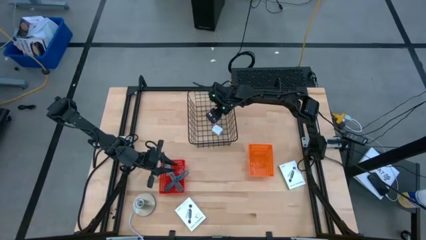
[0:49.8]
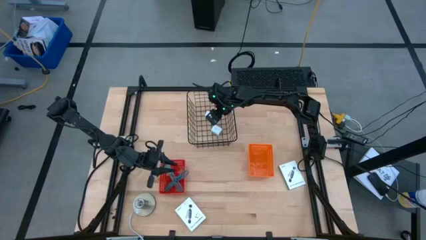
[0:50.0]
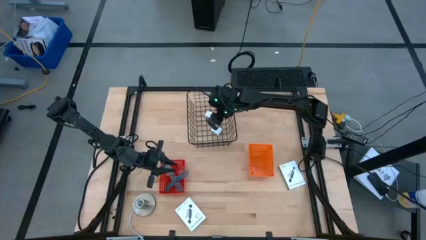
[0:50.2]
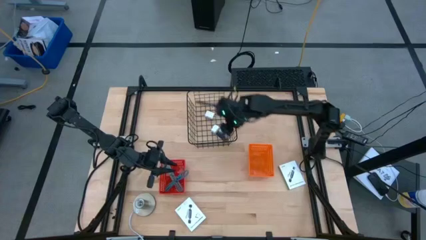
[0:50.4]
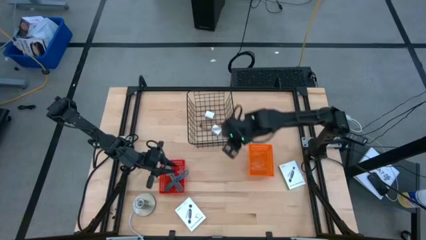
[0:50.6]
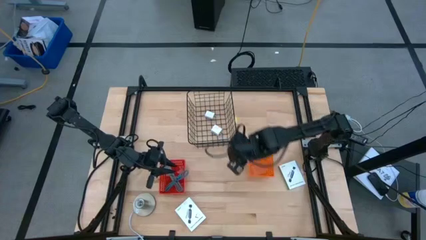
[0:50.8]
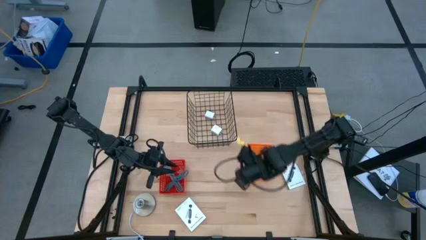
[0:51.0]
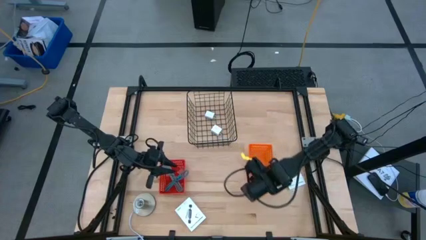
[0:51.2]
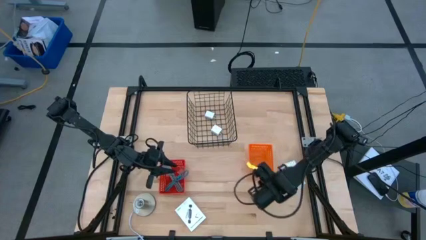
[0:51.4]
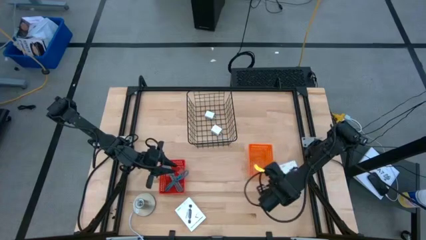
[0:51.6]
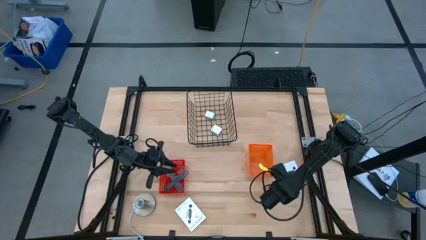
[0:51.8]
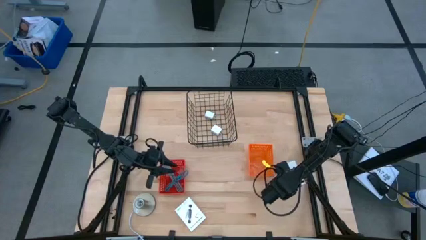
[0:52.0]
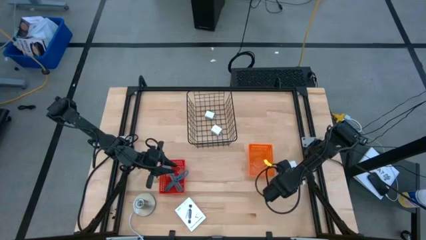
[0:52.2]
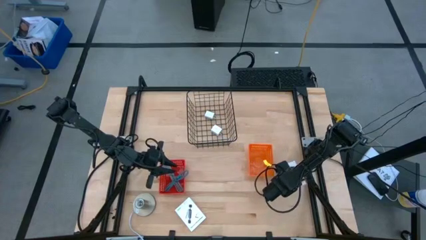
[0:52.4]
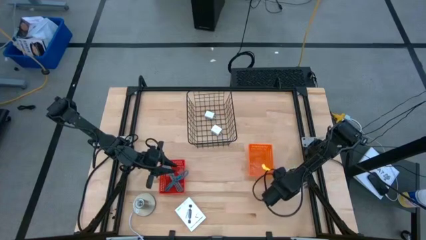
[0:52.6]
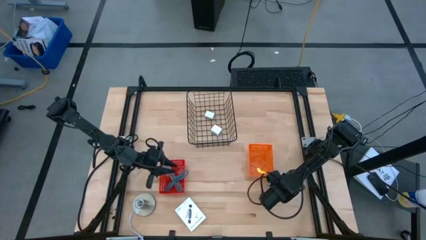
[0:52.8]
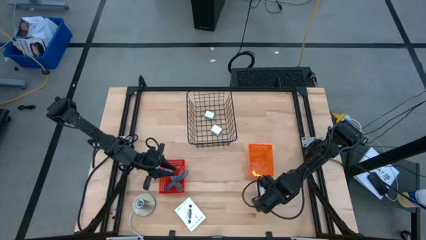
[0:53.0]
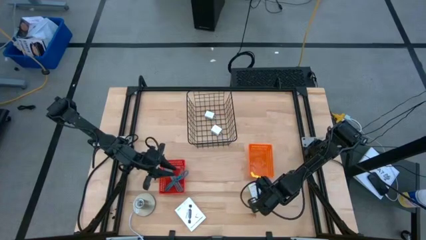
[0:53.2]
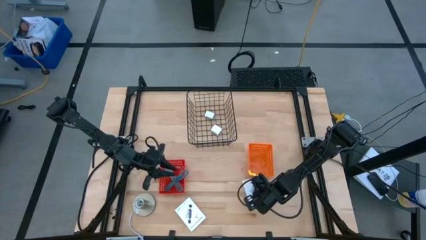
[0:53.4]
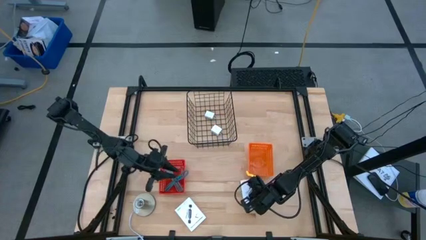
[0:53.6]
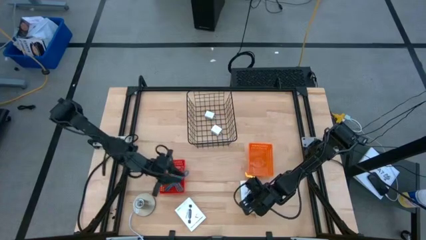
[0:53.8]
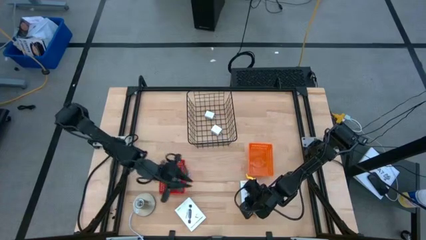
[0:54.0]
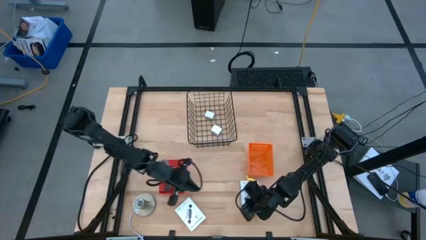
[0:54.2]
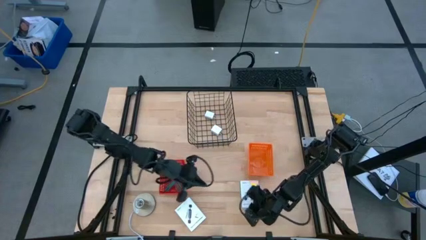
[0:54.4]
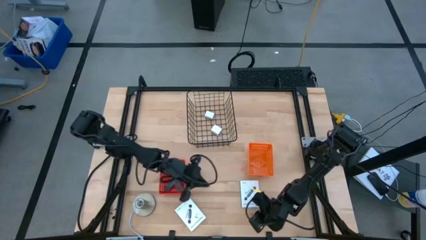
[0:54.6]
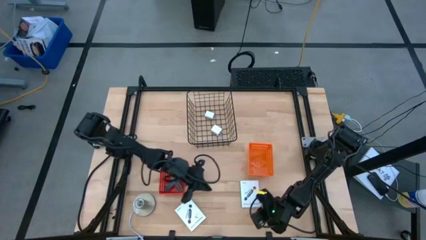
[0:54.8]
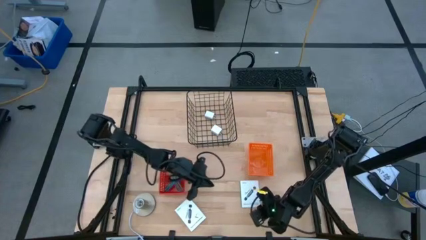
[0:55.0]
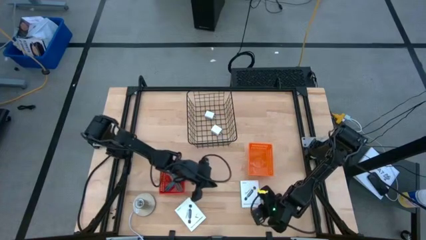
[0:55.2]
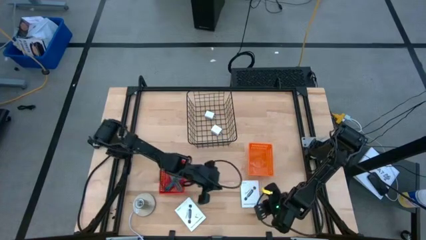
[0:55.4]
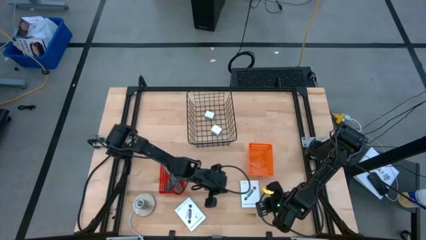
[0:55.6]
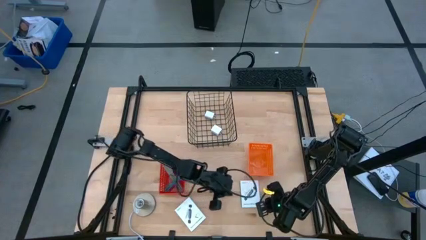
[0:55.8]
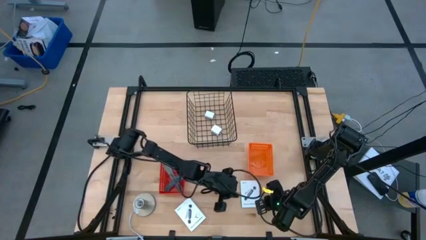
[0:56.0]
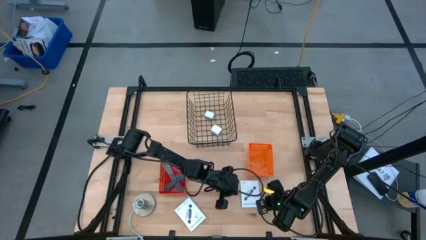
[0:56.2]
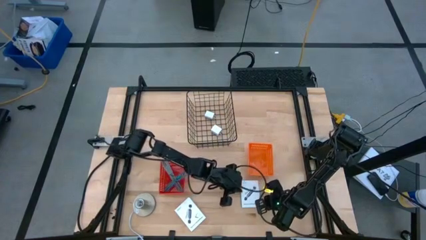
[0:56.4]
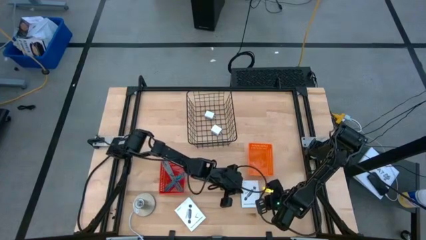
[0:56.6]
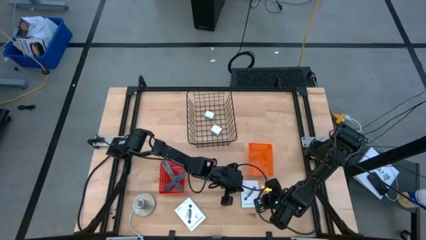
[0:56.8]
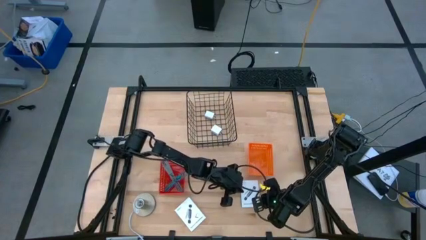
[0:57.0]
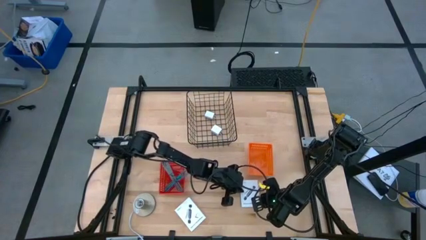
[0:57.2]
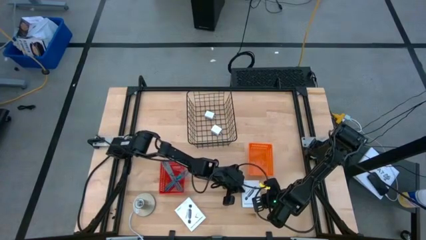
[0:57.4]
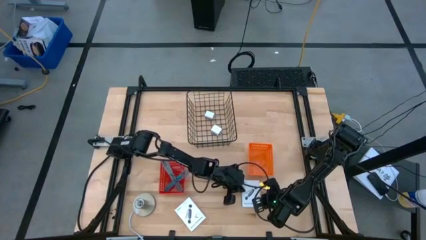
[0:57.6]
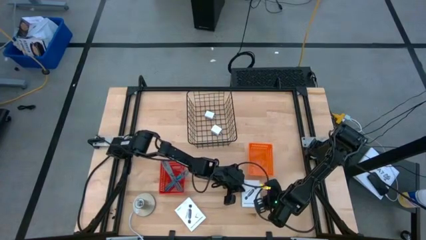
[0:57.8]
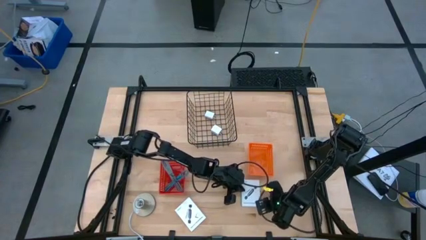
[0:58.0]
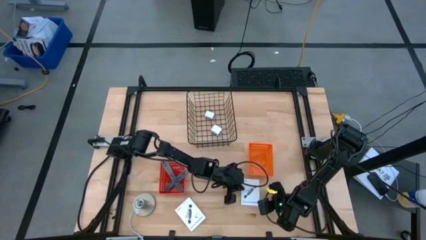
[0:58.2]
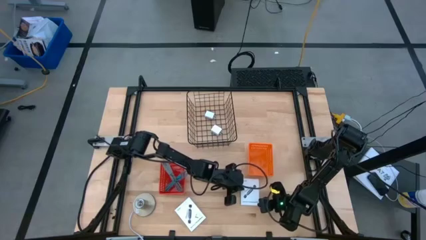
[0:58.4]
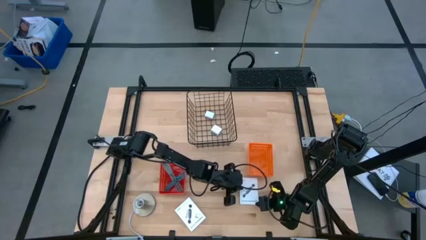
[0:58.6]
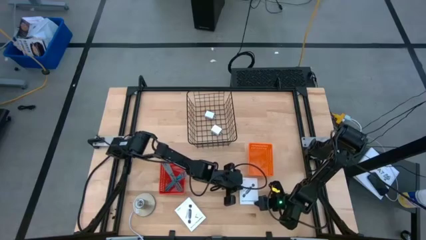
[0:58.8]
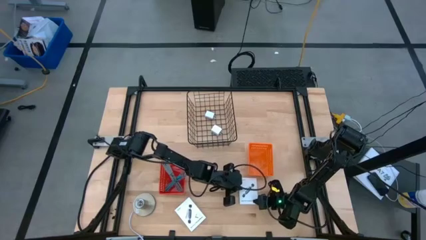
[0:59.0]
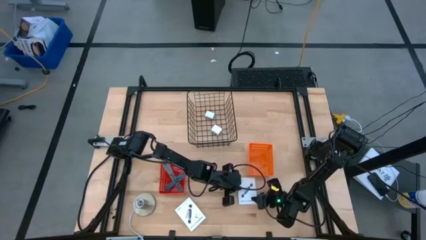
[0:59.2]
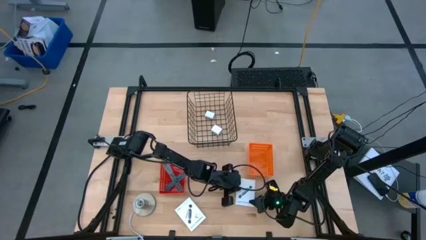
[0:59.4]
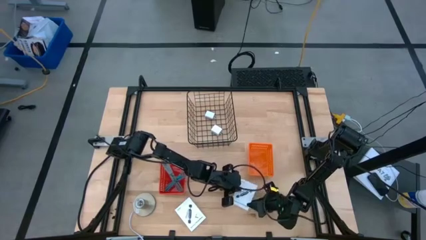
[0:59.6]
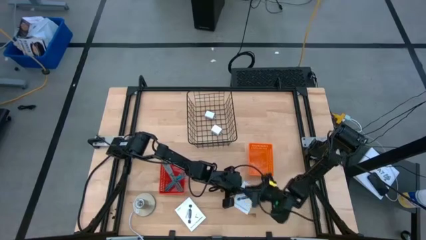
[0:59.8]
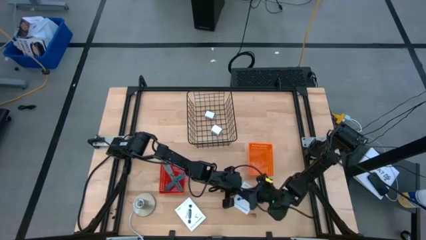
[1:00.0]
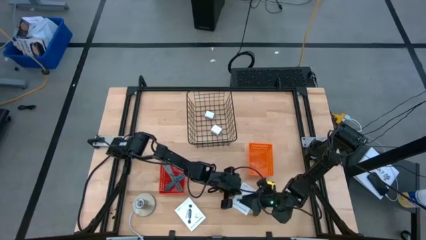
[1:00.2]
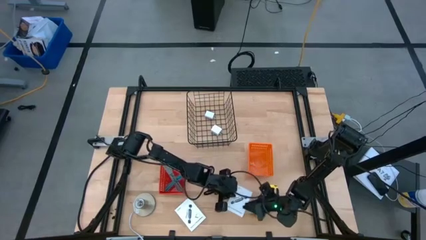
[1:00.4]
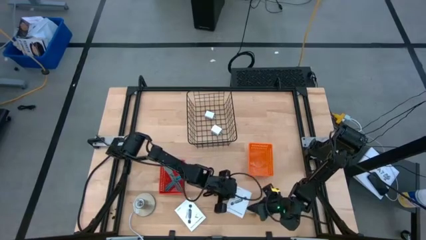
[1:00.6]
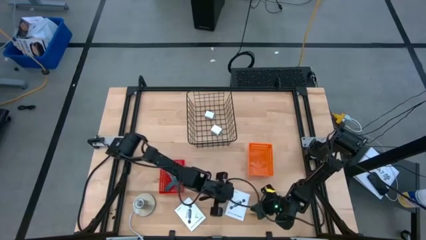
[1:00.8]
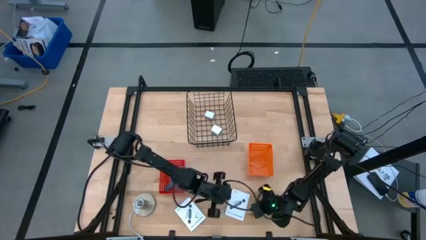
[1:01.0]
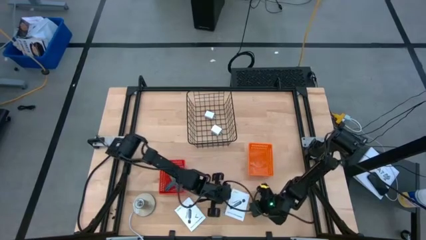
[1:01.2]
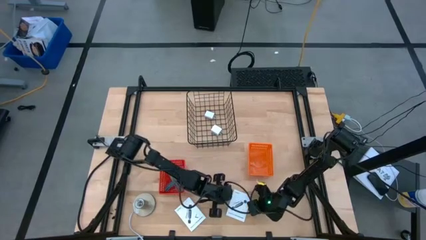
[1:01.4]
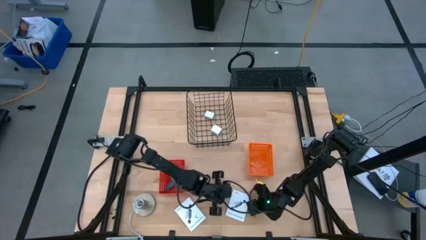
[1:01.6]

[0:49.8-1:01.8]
Task: Pick and place items into bin
Put the top white card reader box into the orange bin
